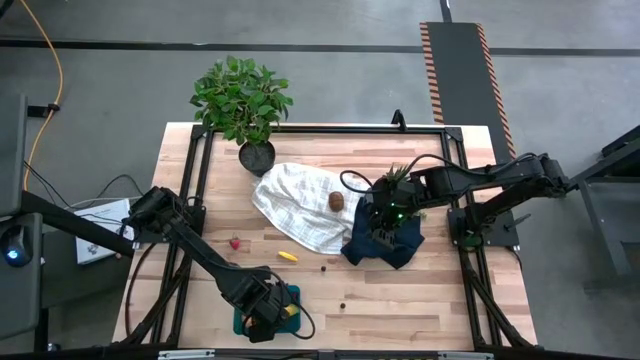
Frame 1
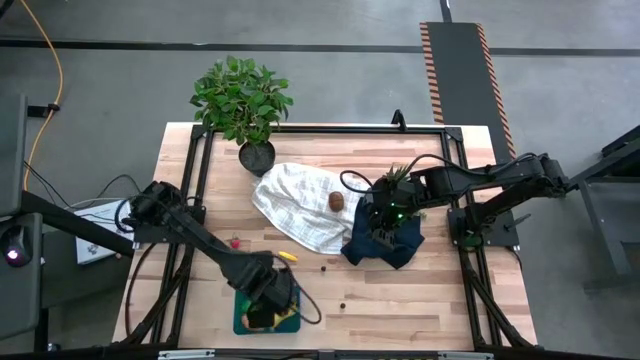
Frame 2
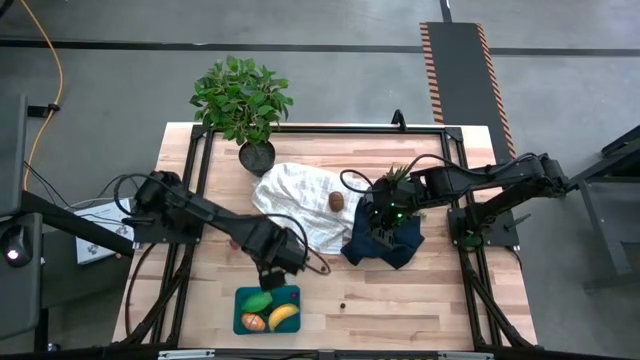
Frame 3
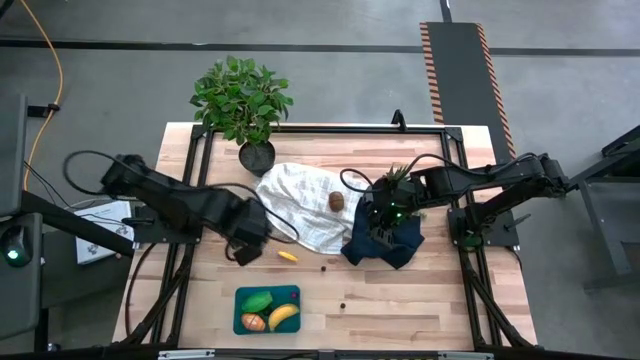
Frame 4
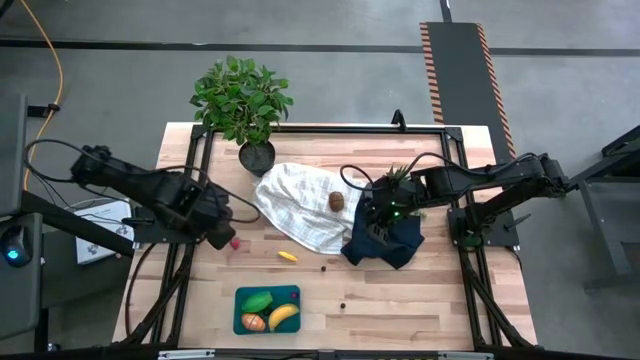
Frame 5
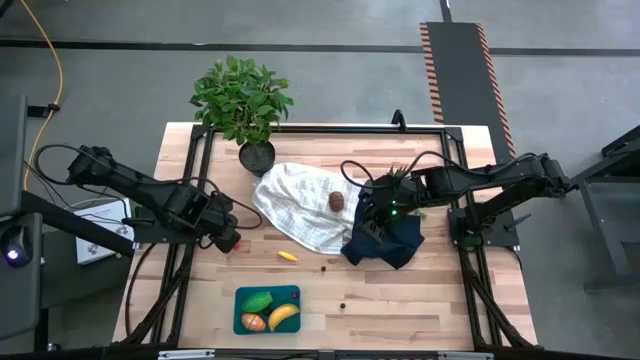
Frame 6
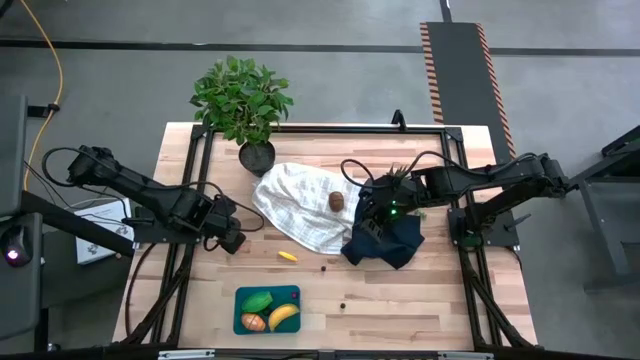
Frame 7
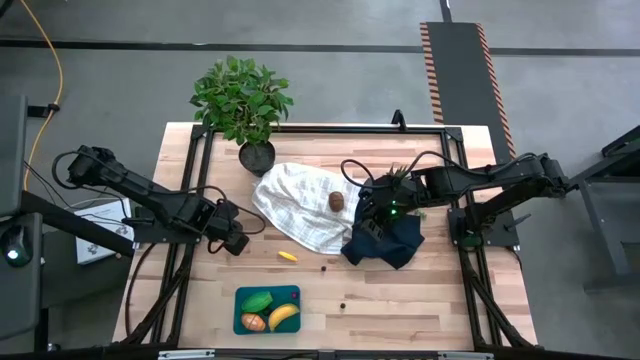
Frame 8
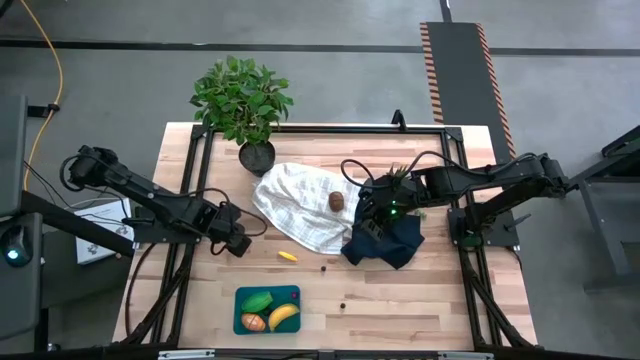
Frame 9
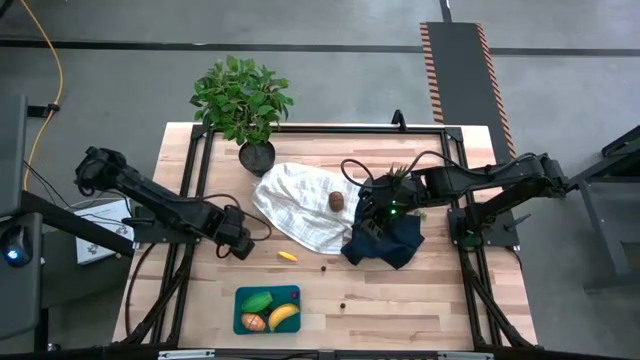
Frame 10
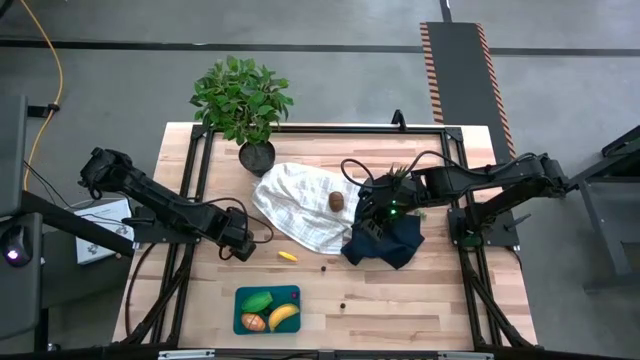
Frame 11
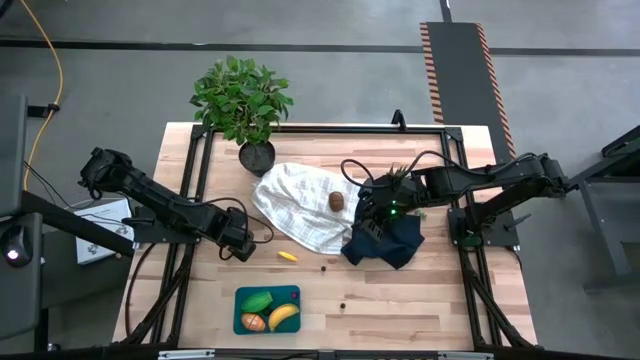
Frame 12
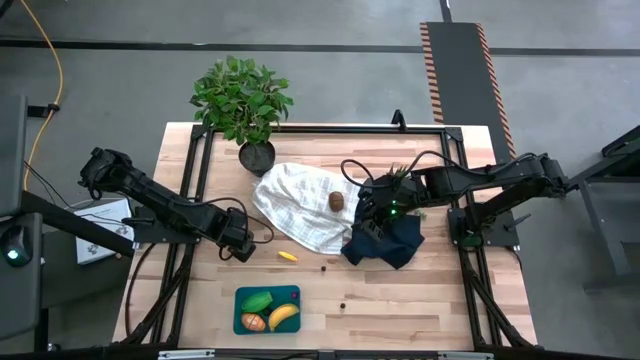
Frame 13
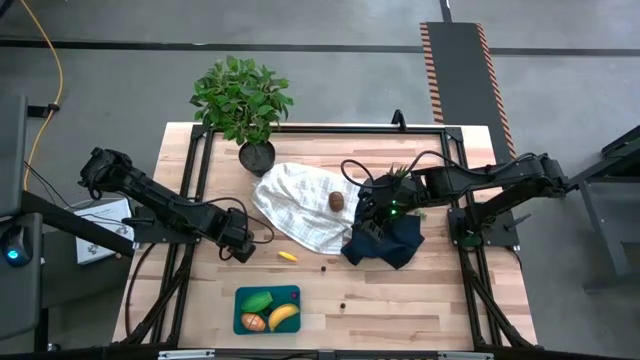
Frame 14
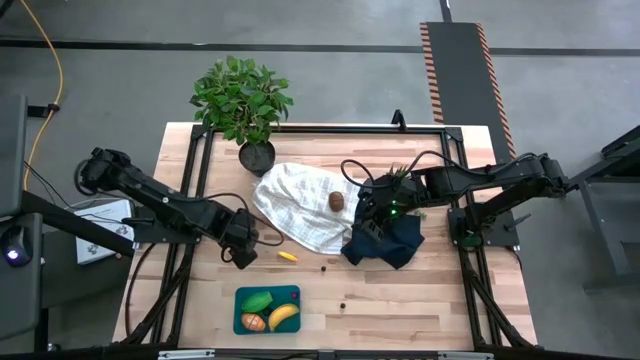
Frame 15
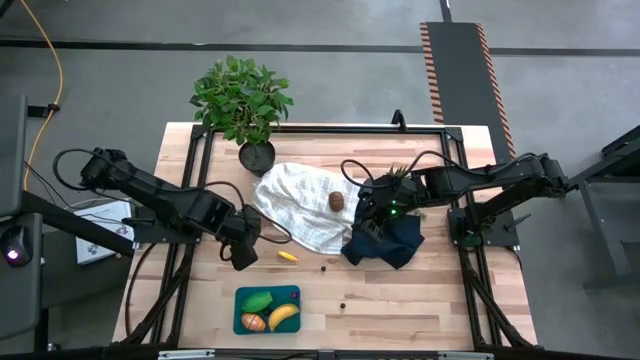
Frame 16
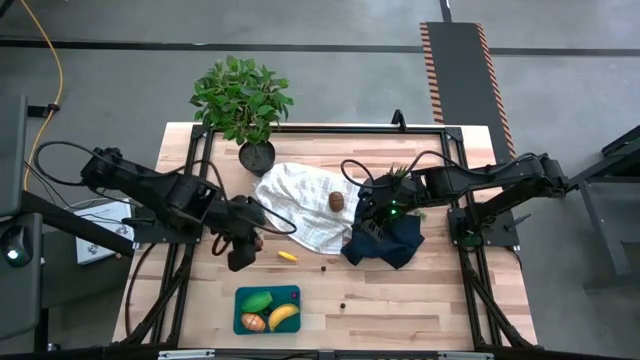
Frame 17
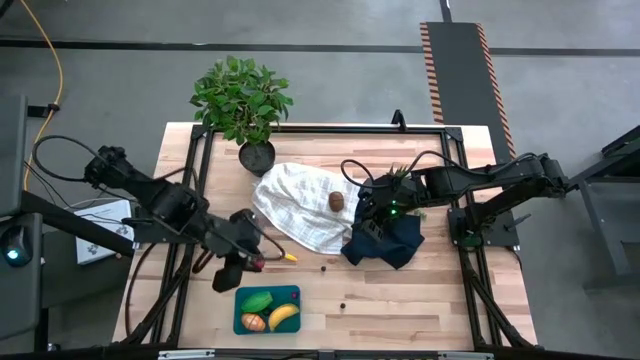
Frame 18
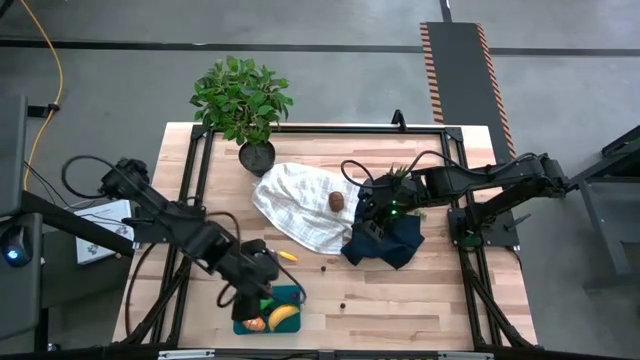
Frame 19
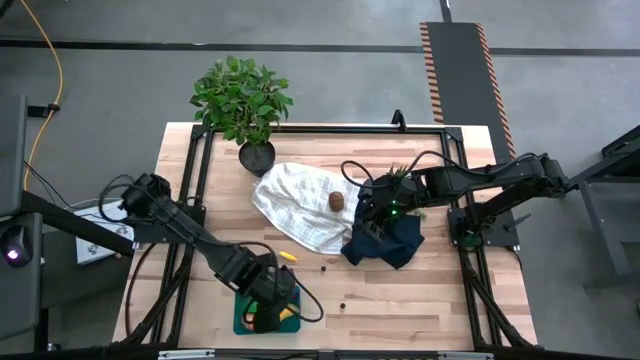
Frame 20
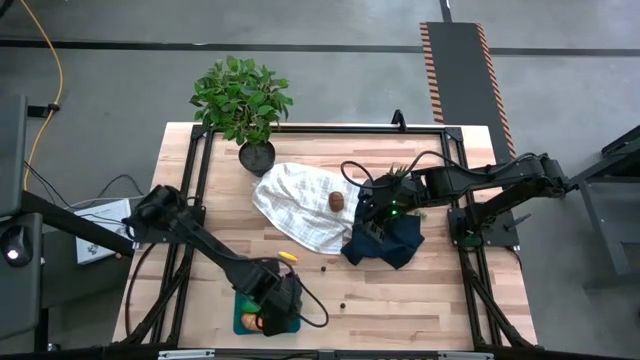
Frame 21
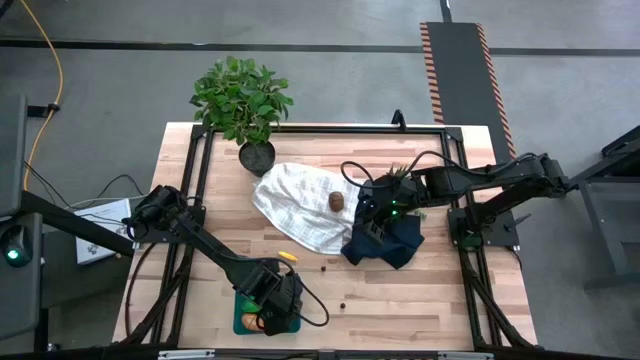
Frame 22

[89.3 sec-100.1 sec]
Task: Pick and placing Produce into tupperware
Put the strawberry into the bin

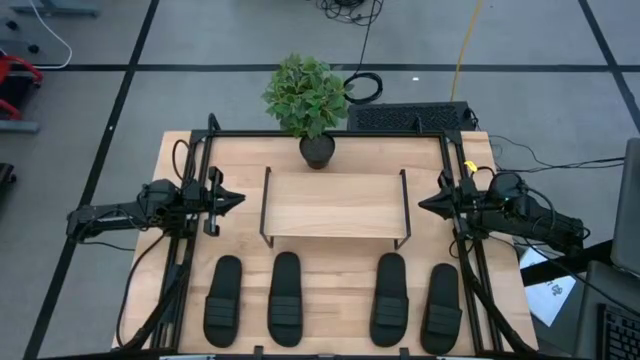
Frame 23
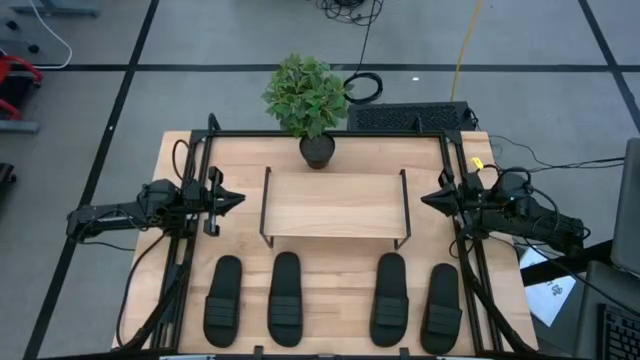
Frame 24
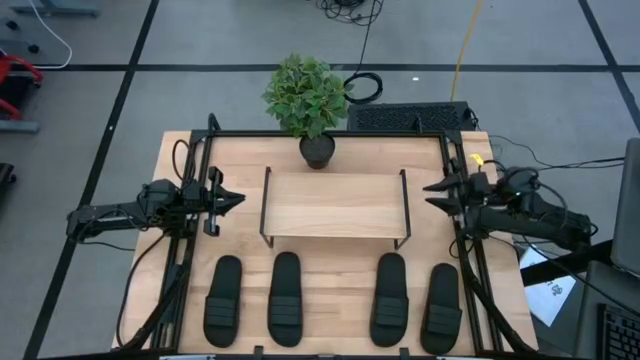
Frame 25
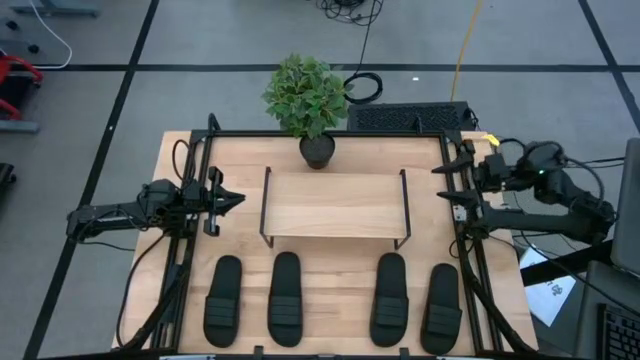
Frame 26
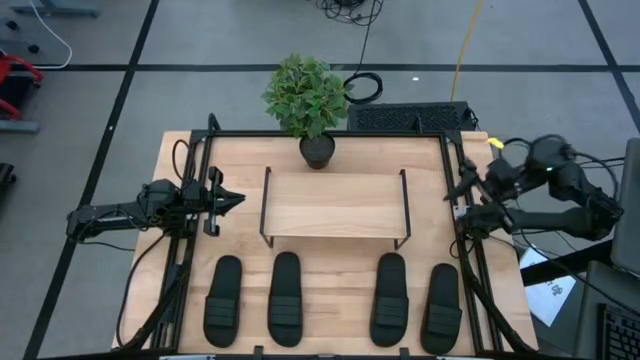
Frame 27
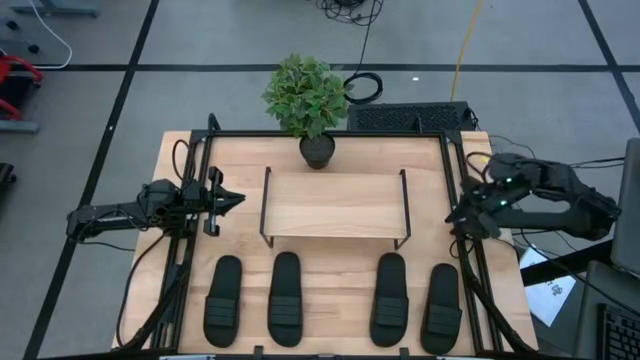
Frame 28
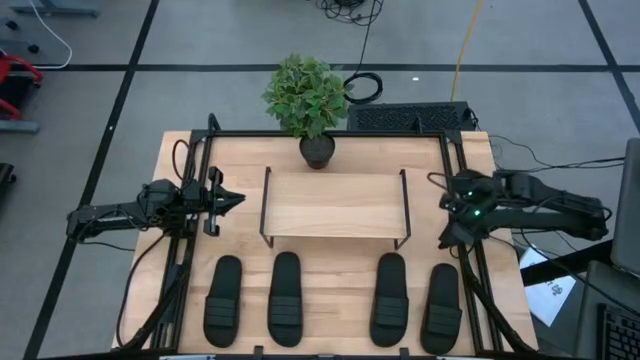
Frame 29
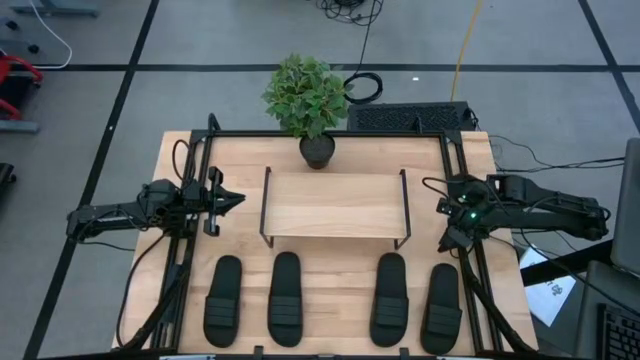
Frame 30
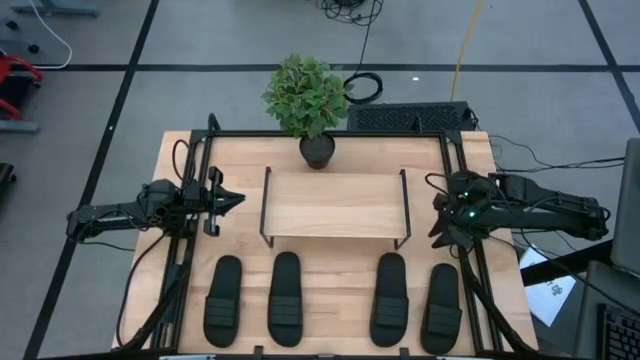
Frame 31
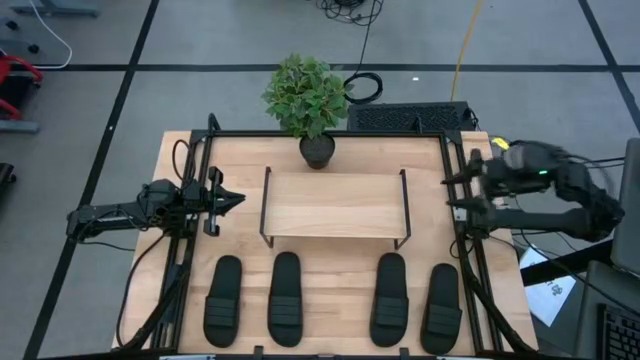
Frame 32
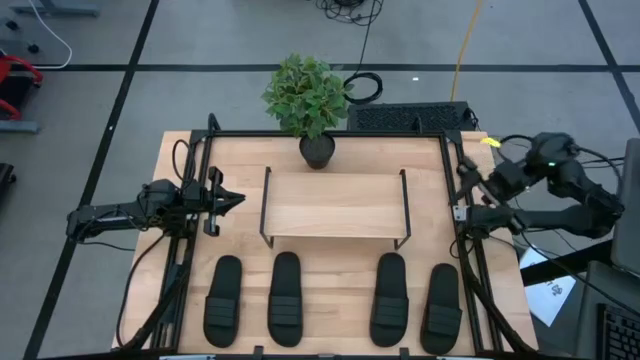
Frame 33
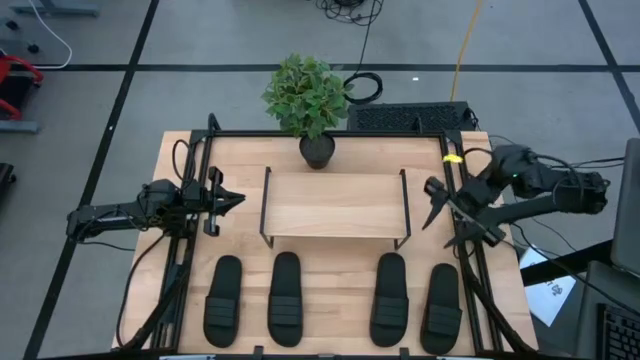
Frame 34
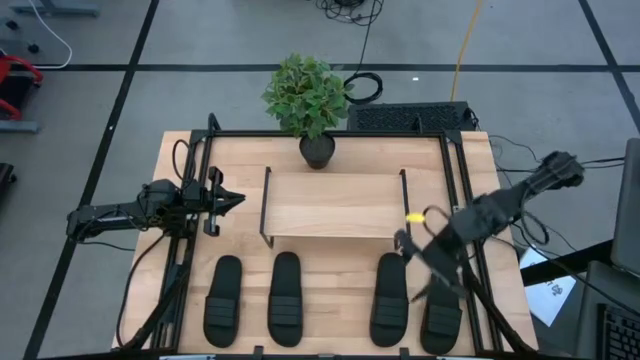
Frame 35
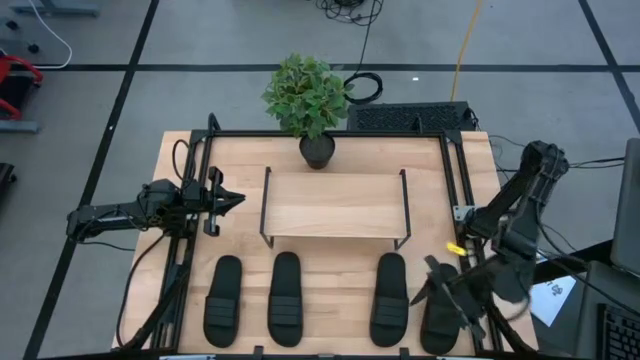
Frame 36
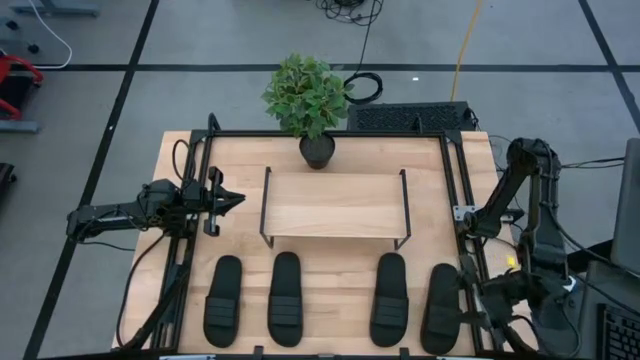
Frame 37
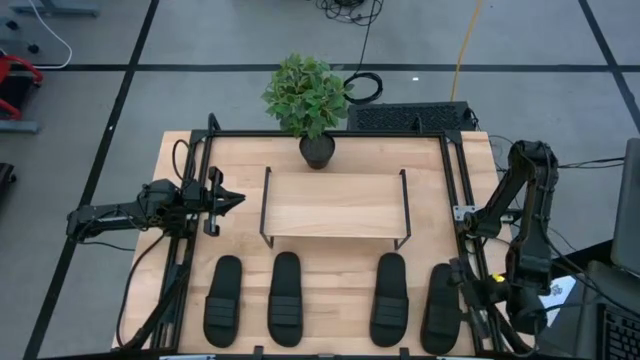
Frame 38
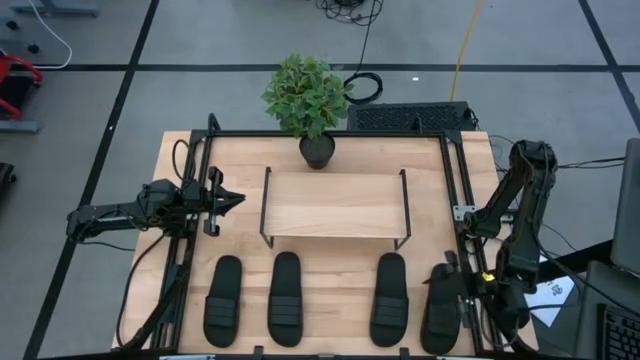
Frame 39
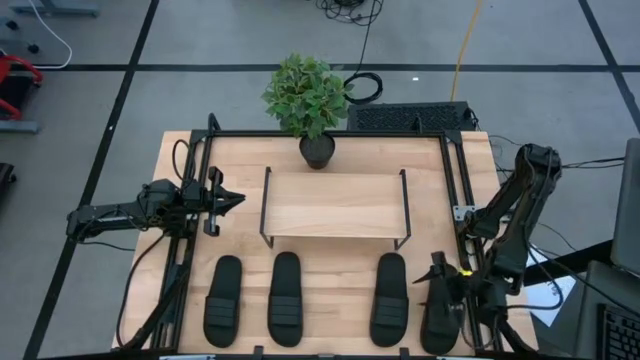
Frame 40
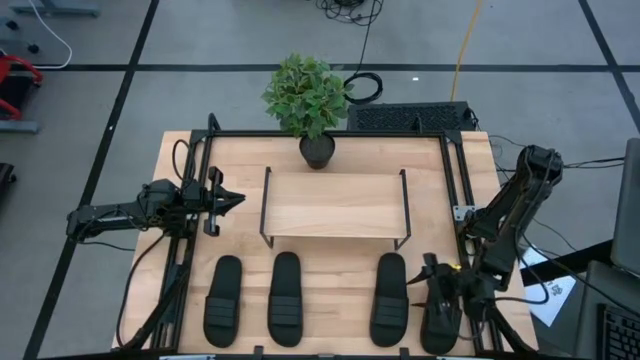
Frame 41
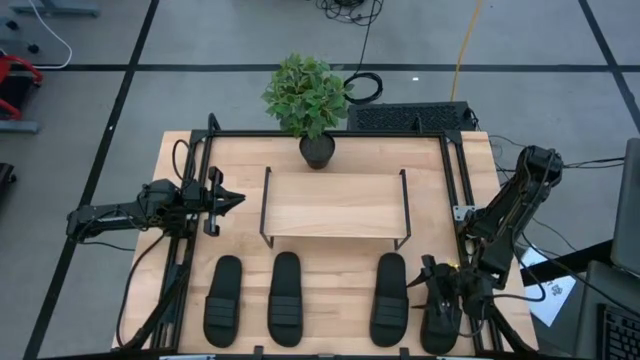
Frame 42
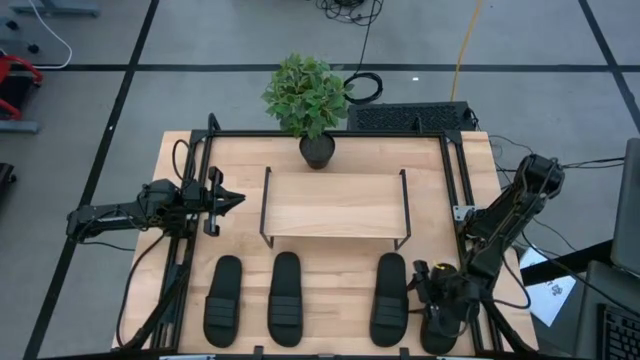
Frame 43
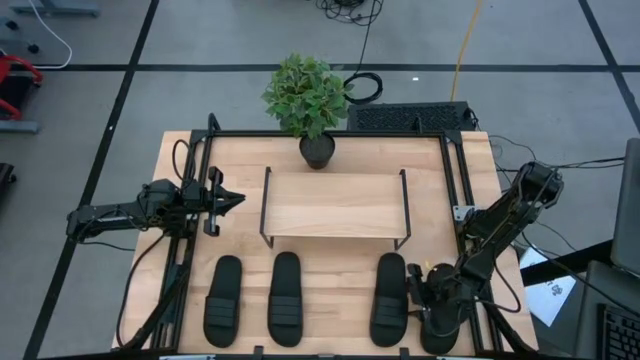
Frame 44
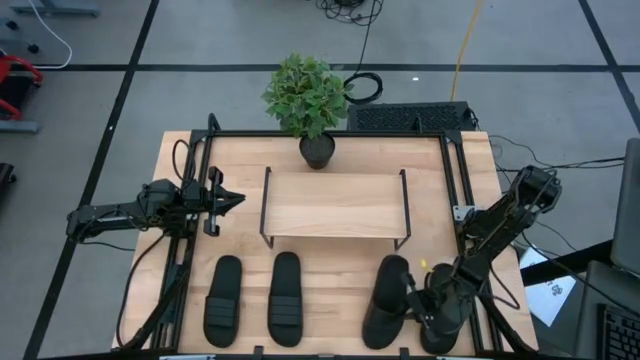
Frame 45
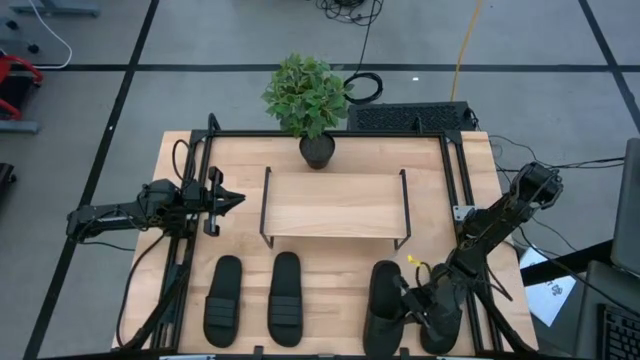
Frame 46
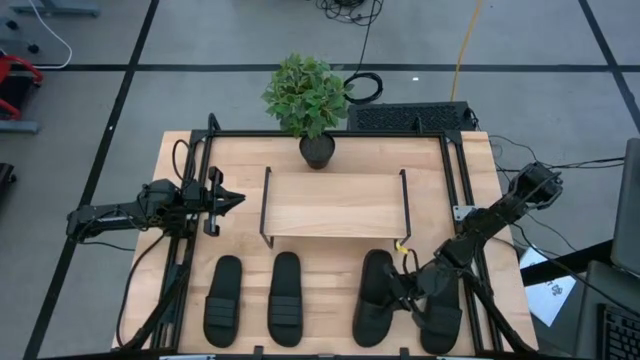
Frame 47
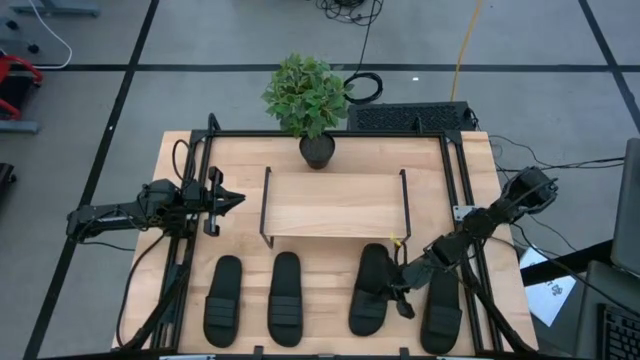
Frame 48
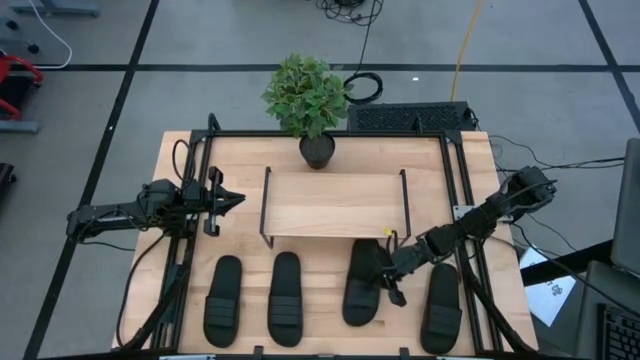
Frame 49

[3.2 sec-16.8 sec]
Task: Pick and place slides into the shelf
Put the black slides under the shelf
